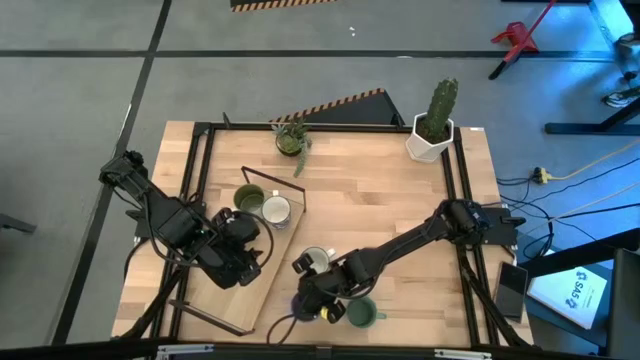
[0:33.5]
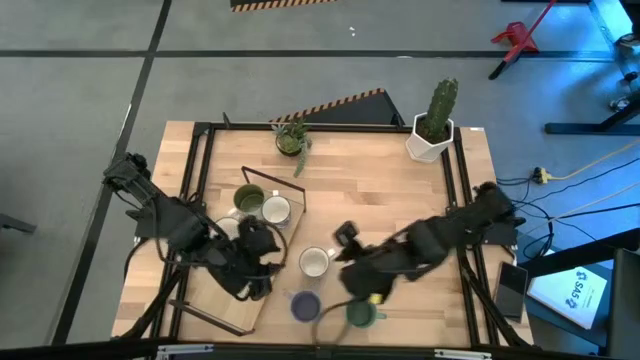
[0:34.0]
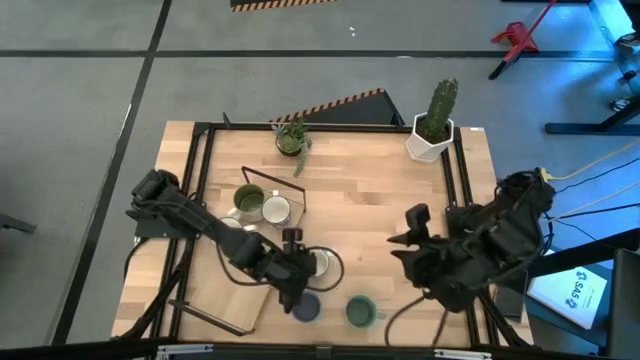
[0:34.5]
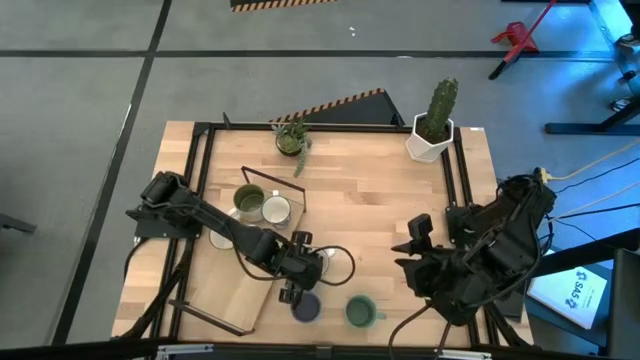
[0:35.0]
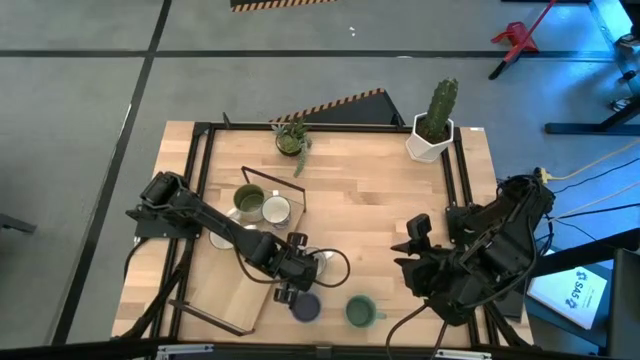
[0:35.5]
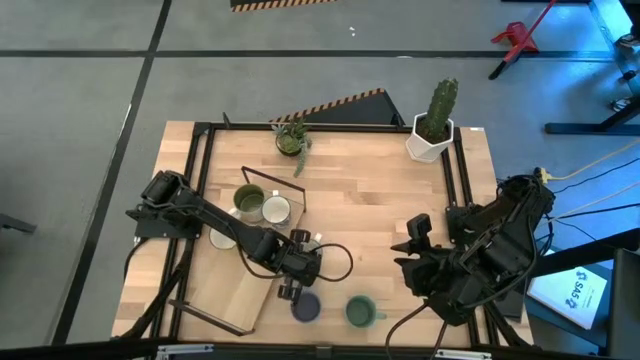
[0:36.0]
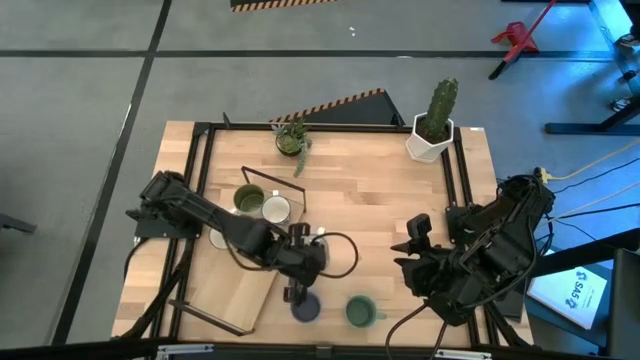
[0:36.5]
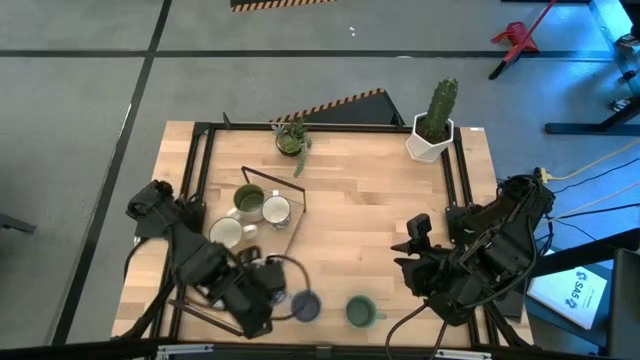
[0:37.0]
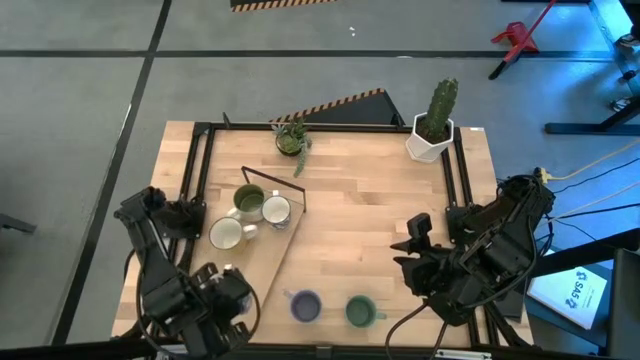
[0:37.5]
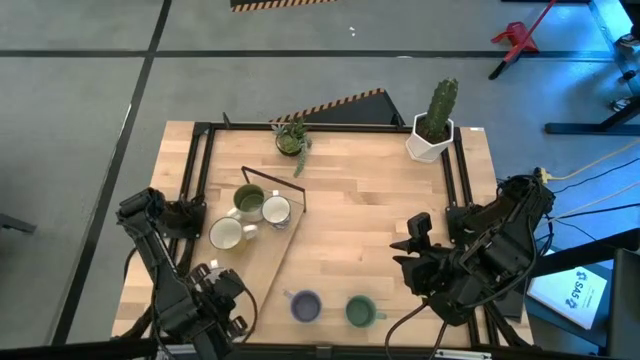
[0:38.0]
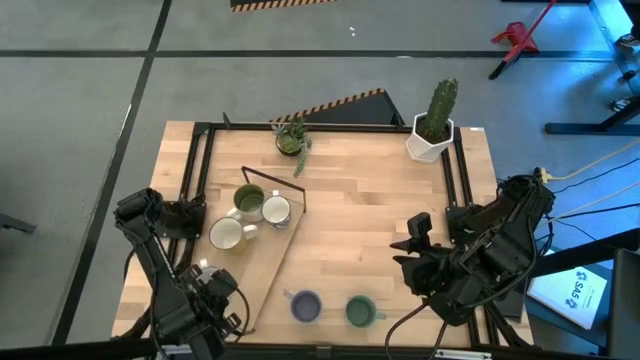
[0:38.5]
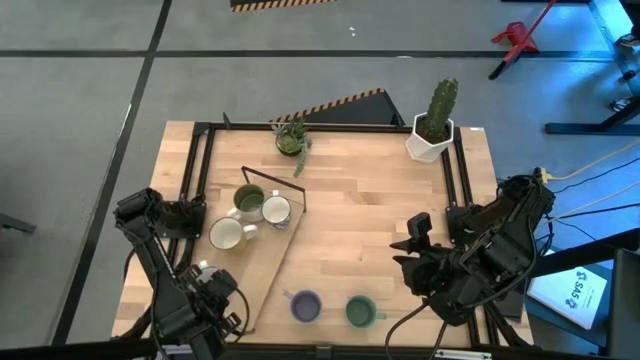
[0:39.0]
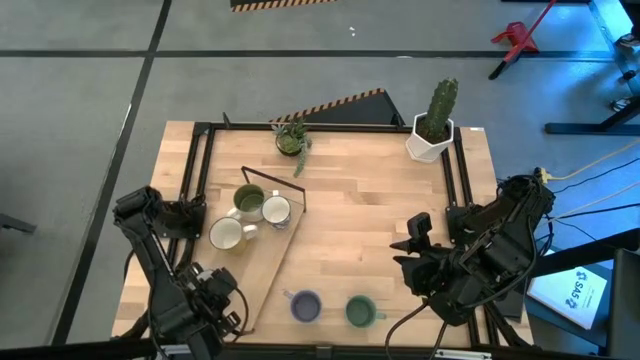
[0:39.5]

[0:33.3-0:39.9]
Task: Place coffee mugs
Put the blue patterned mug on the shelf

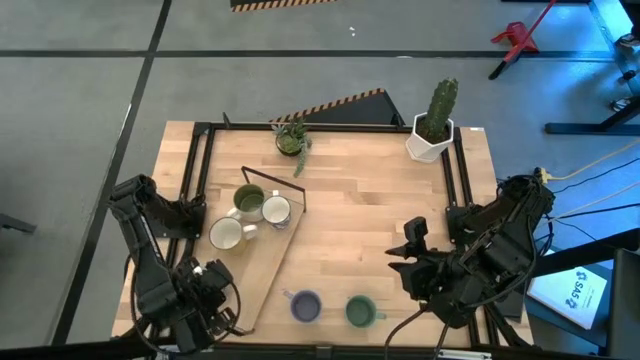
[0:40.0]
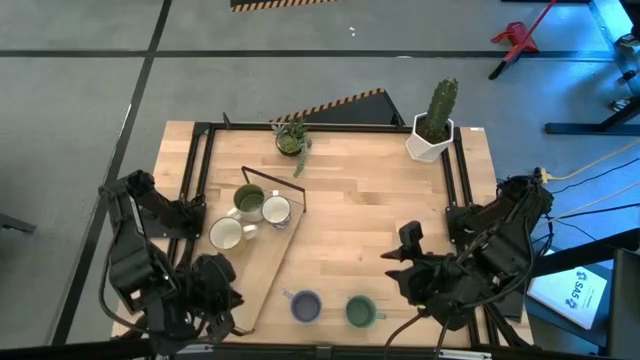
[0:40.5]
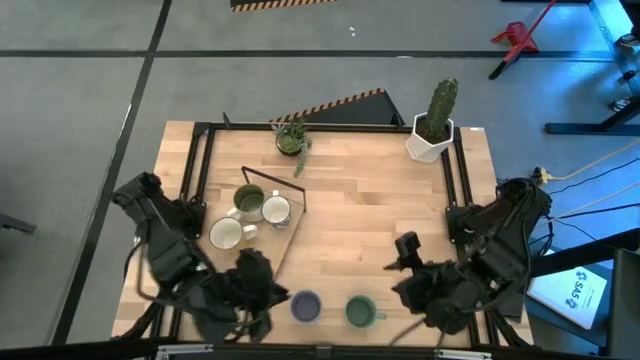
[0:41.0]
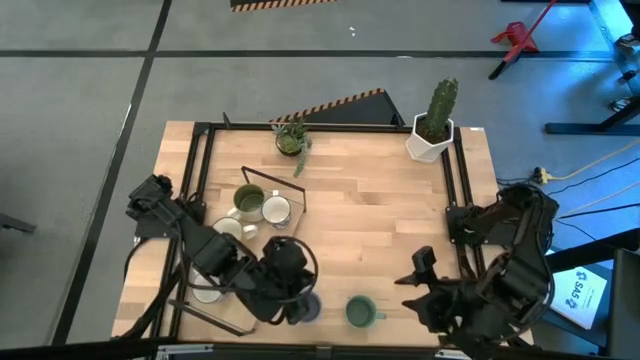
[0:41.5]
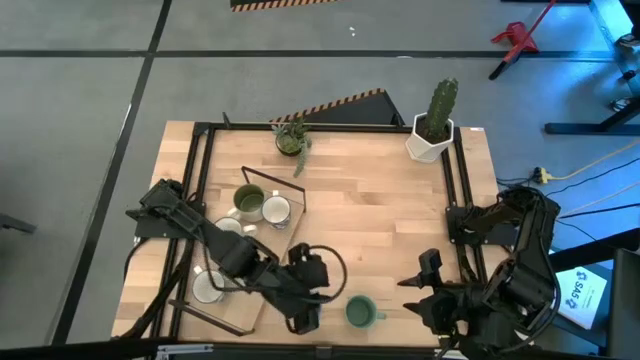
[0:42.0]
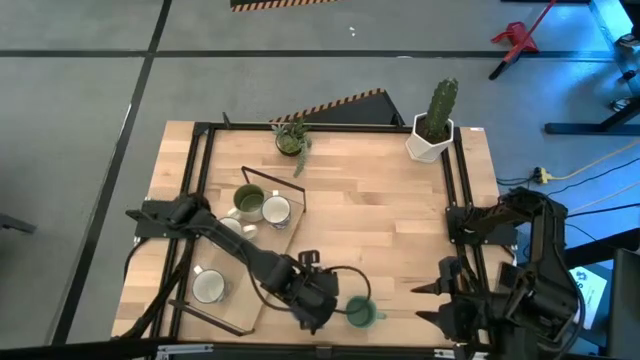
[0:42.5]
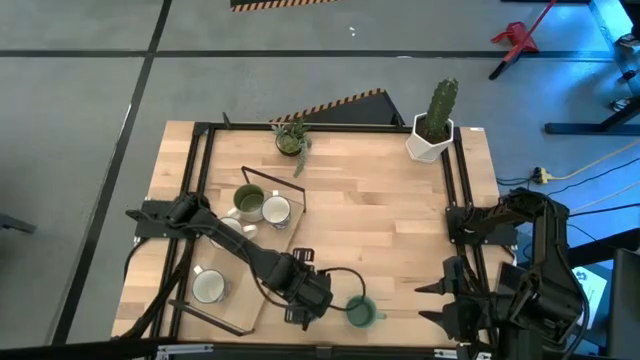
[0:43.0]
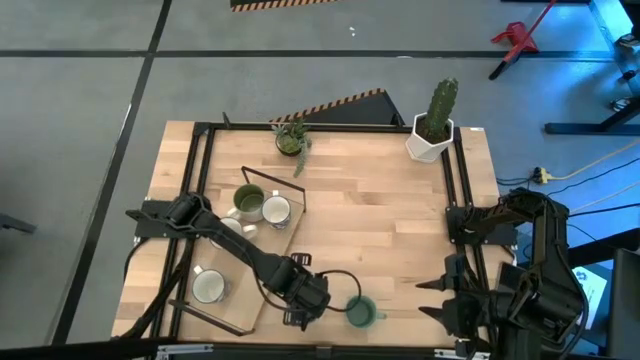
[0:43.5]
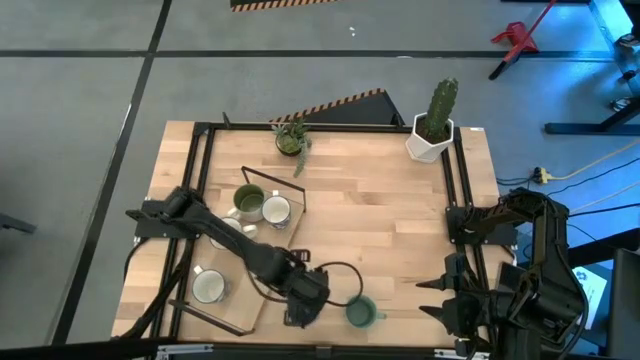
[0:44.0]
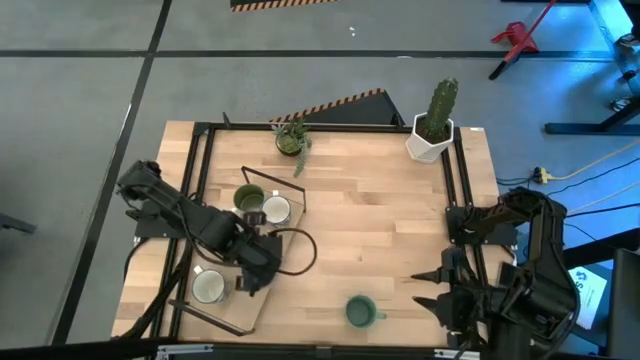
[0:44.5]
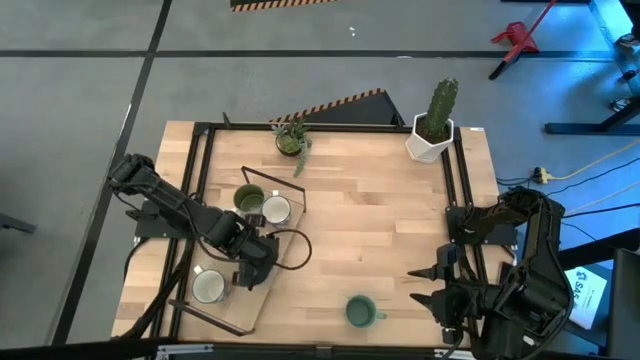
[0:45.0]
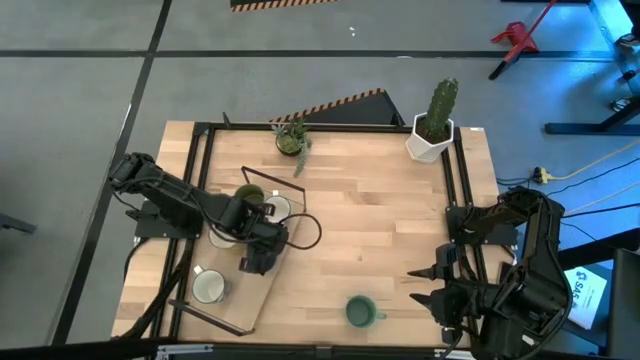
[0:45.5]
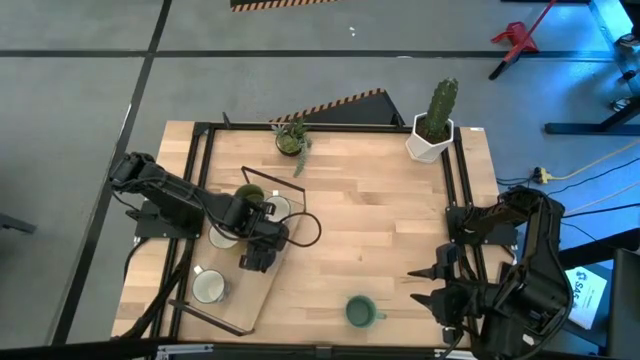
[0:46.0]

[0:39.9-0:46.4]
Put the purple mug on the shelf

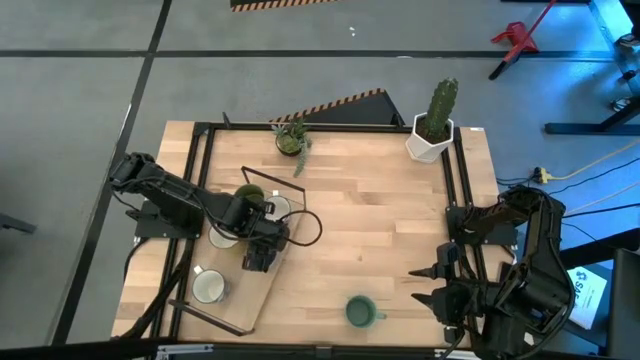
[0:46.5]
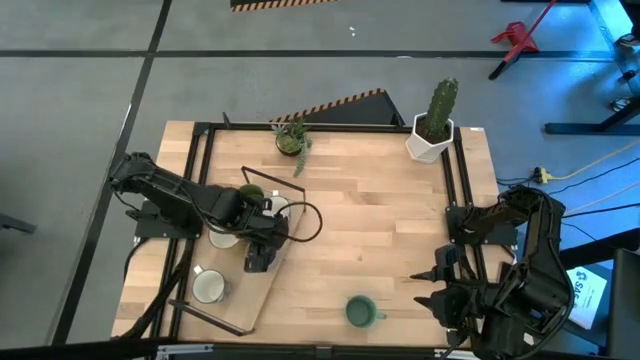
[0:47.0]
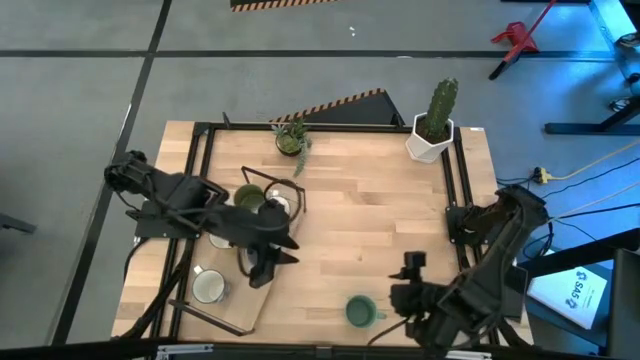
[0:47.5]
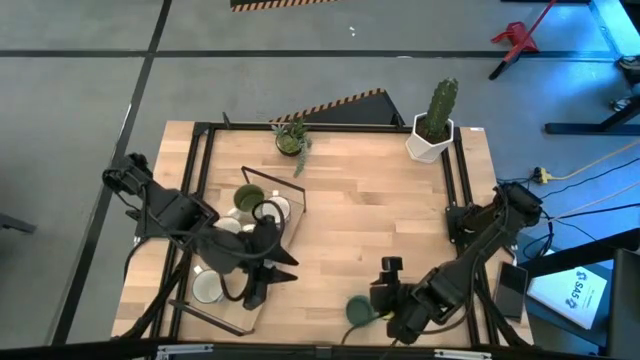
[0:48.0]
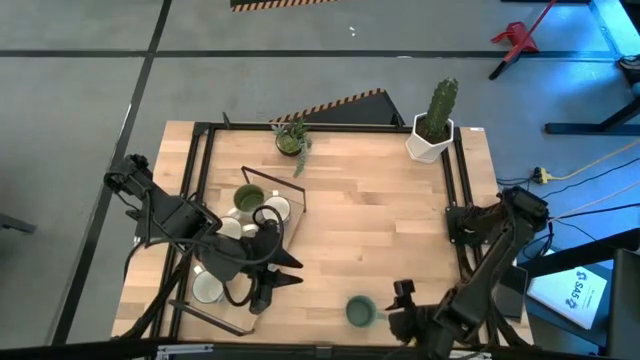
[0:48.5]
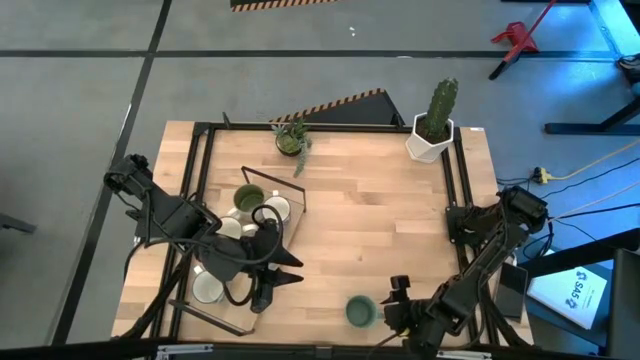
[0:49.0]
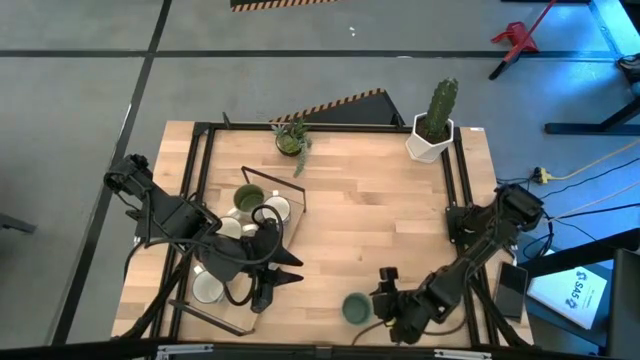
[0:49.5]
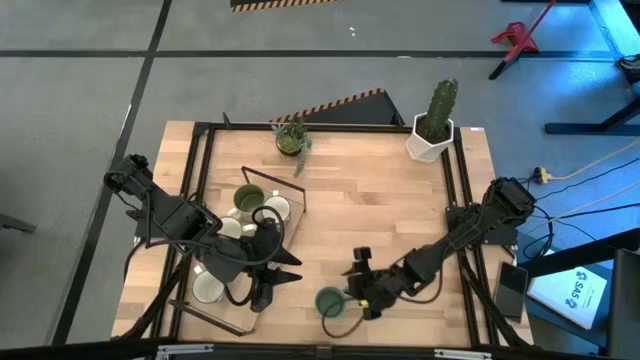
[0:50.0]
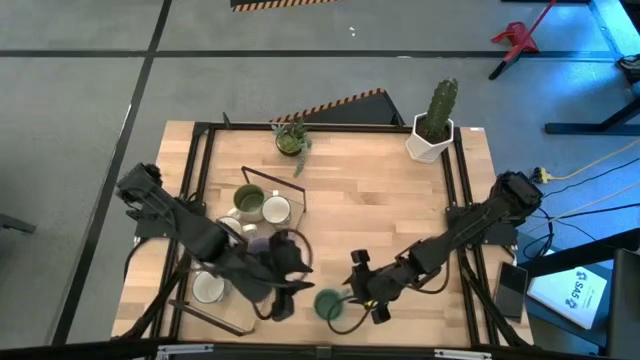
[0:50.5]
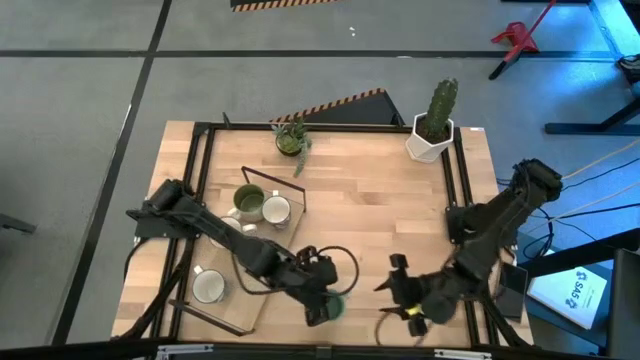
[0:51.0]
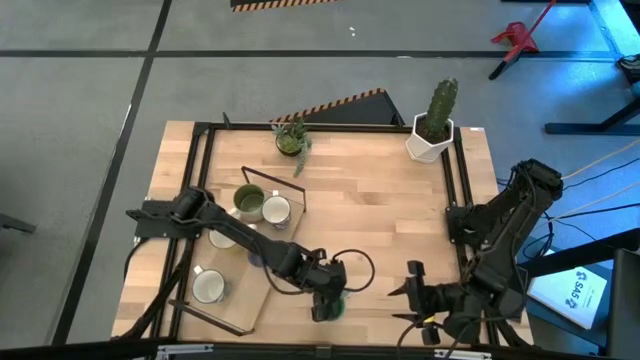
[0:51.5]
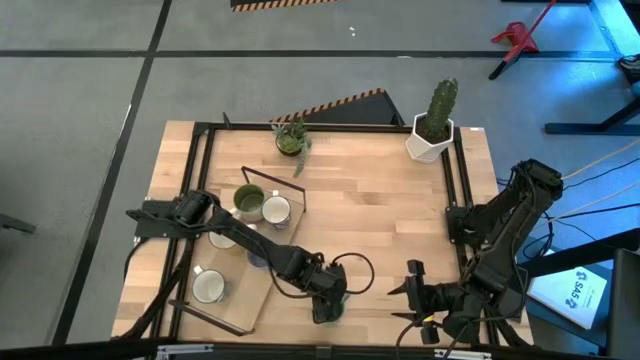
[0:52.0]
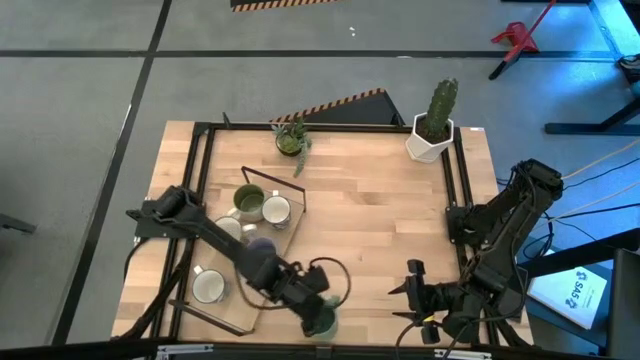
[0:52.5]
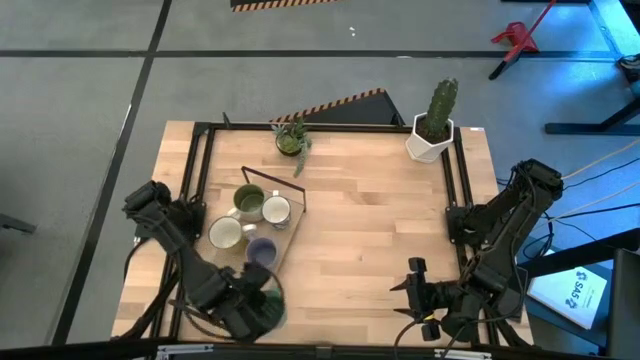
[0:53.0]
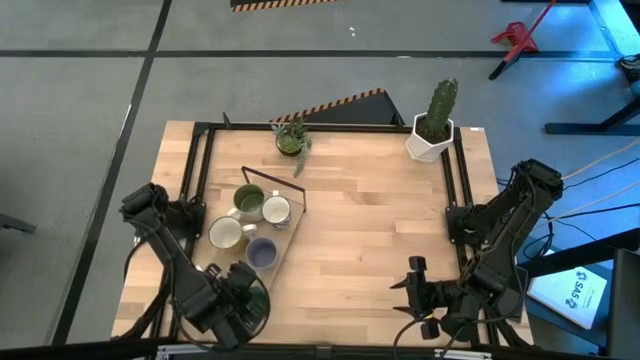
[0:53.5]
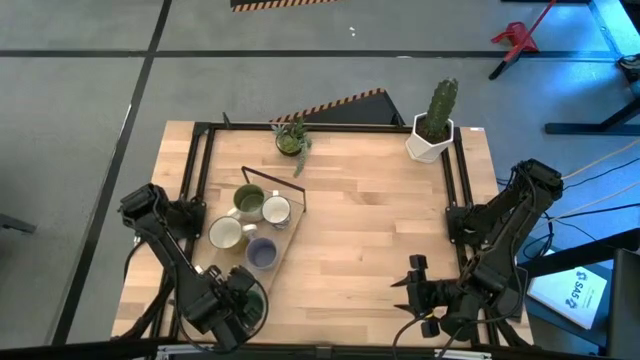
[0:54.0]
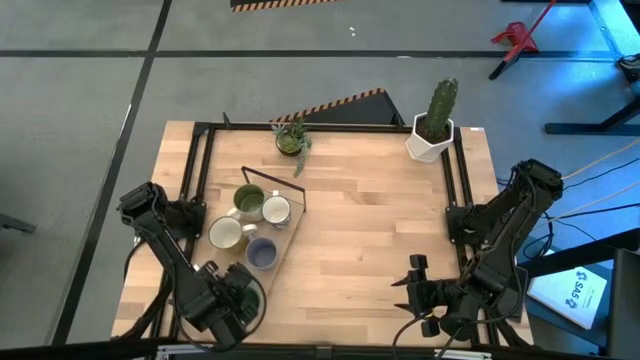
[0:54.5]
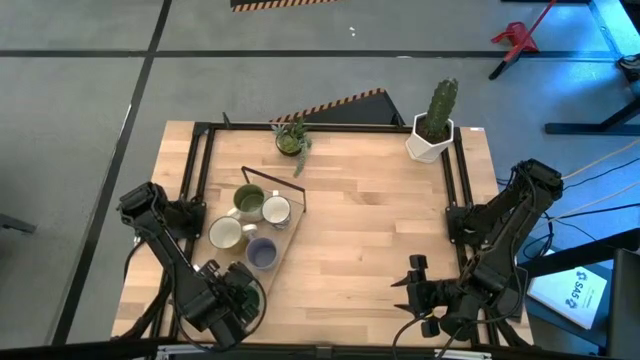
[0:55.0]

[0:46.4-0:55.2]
Put the green mug on the shelf
